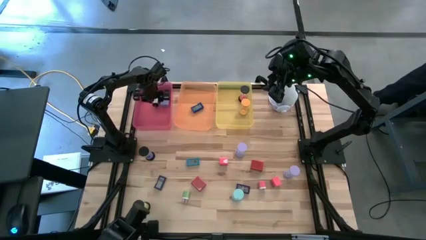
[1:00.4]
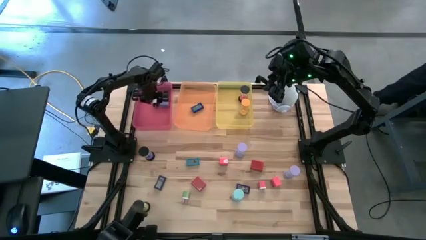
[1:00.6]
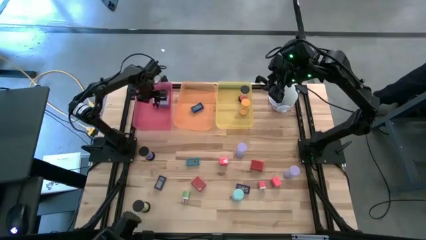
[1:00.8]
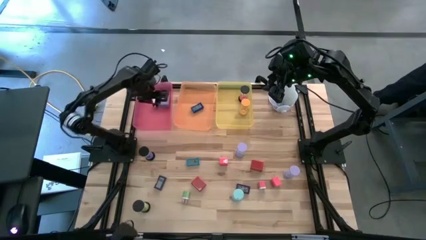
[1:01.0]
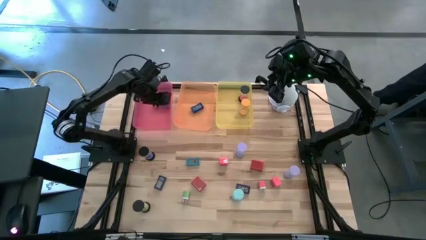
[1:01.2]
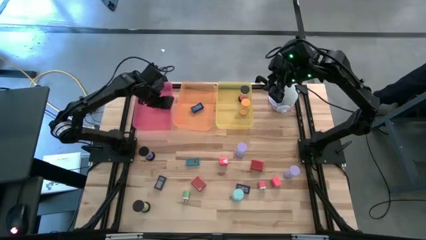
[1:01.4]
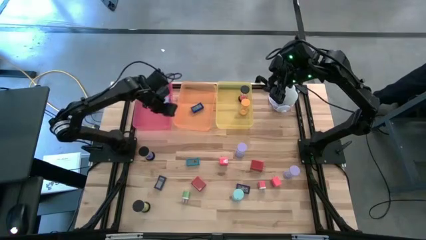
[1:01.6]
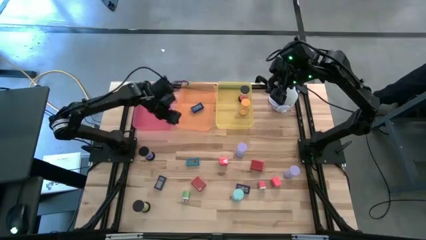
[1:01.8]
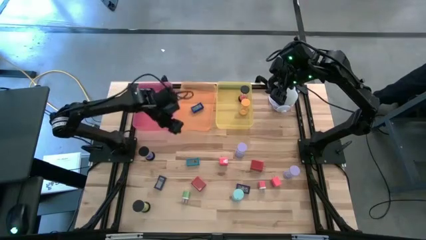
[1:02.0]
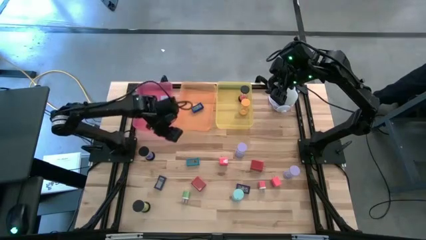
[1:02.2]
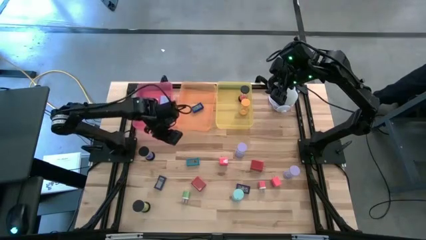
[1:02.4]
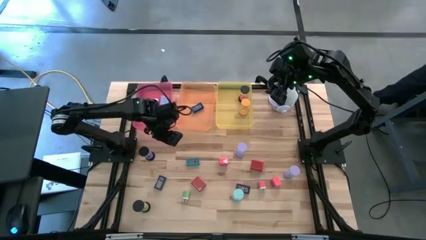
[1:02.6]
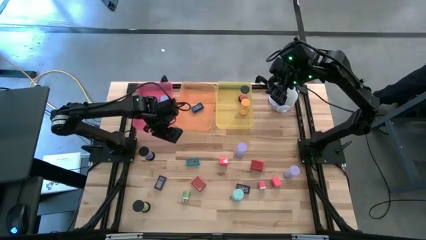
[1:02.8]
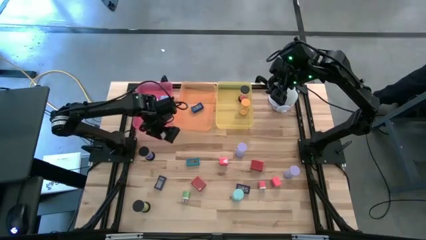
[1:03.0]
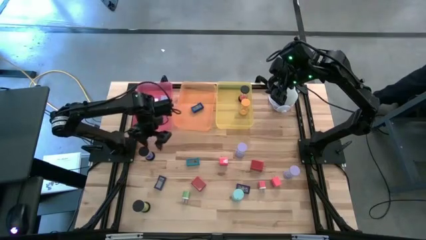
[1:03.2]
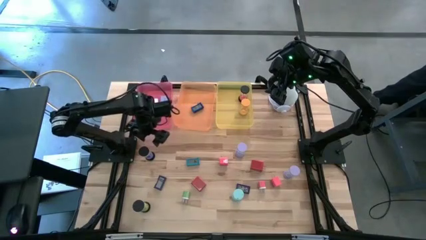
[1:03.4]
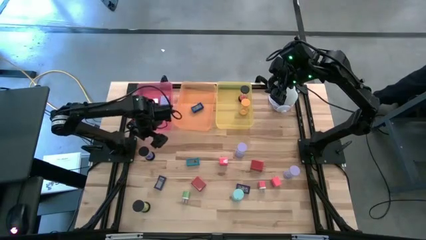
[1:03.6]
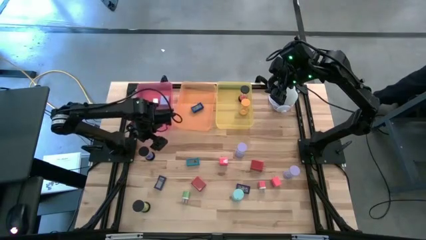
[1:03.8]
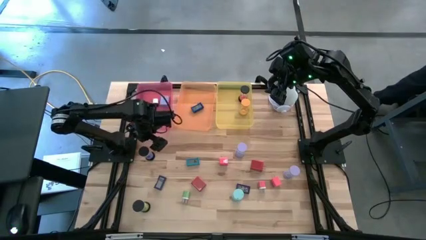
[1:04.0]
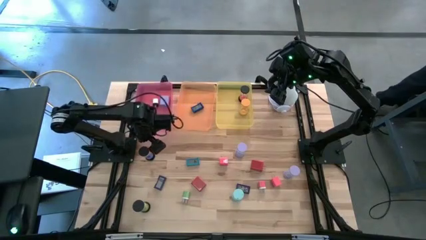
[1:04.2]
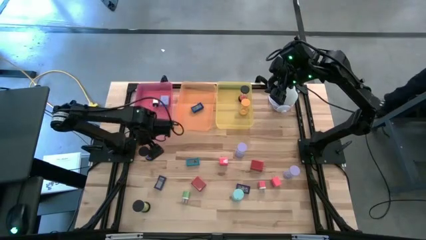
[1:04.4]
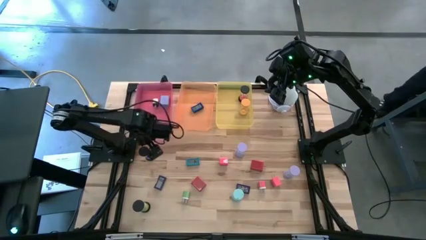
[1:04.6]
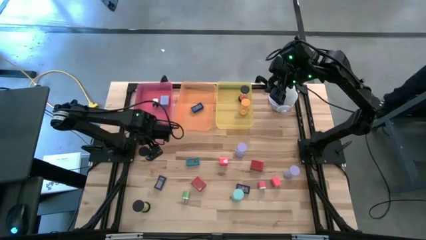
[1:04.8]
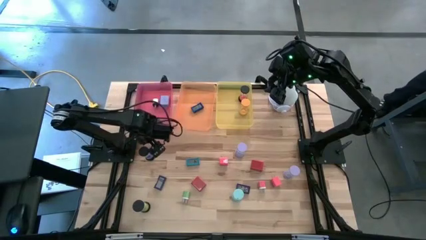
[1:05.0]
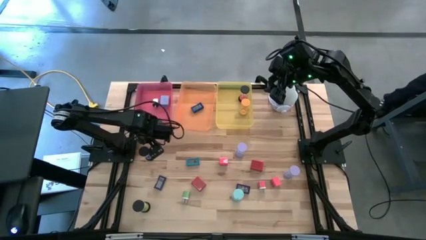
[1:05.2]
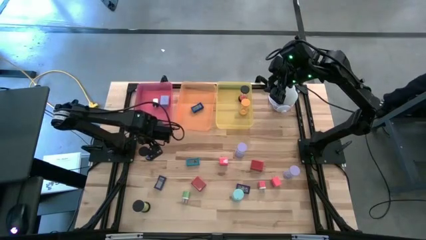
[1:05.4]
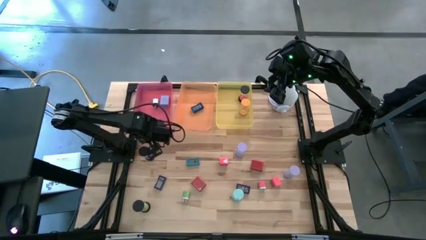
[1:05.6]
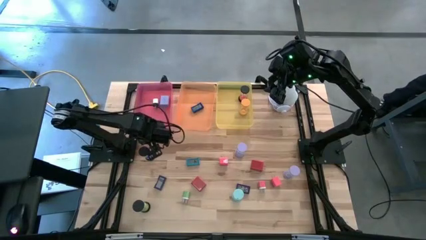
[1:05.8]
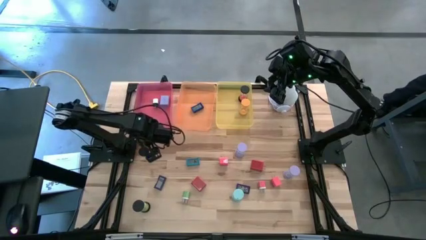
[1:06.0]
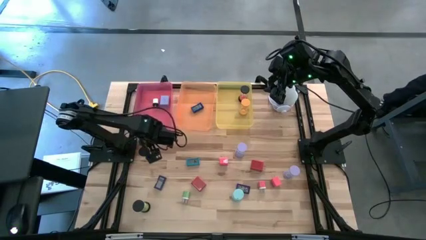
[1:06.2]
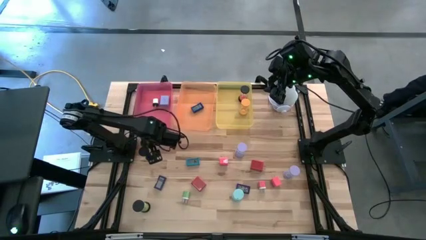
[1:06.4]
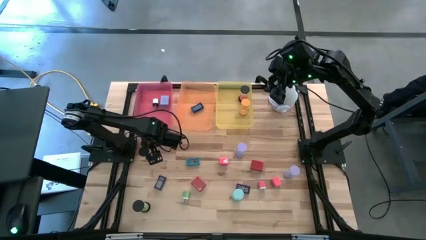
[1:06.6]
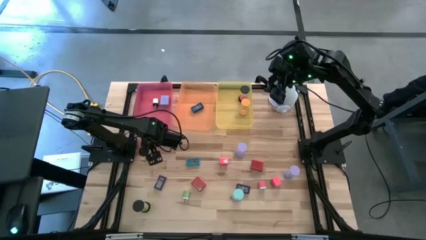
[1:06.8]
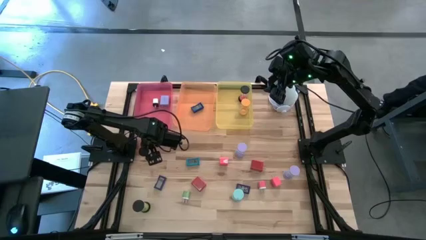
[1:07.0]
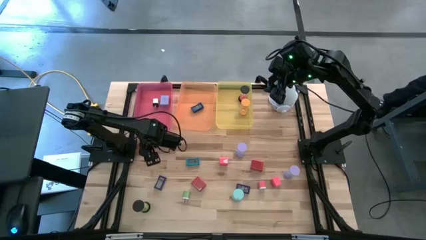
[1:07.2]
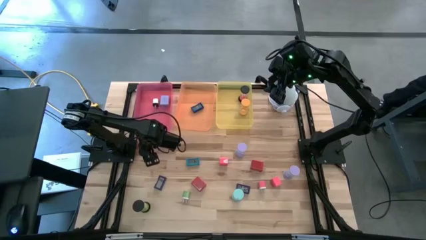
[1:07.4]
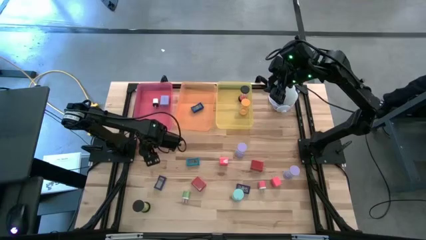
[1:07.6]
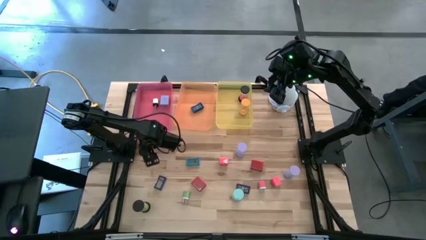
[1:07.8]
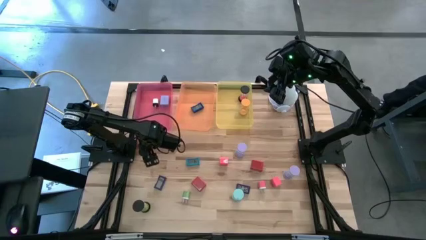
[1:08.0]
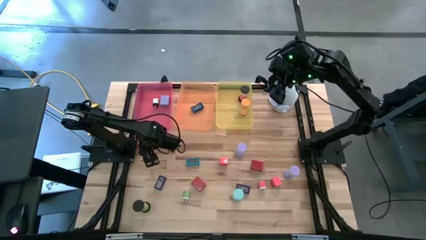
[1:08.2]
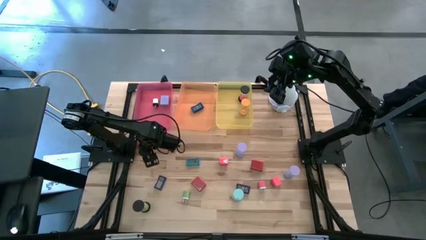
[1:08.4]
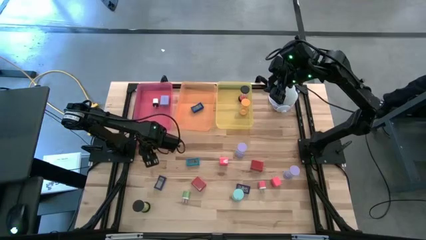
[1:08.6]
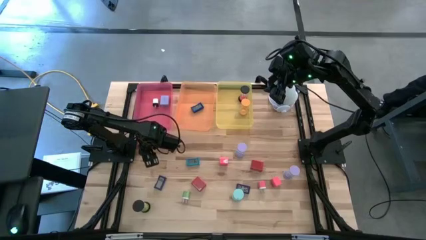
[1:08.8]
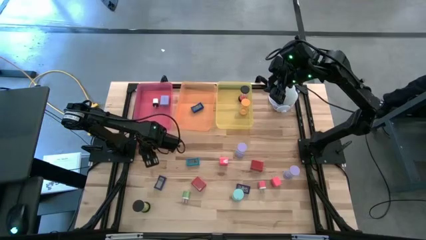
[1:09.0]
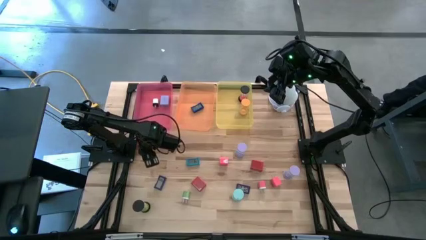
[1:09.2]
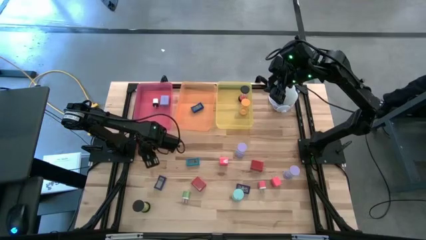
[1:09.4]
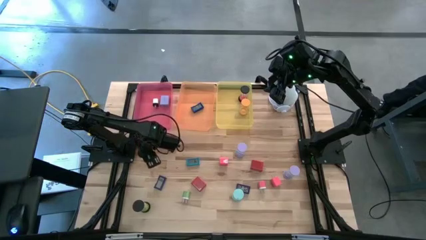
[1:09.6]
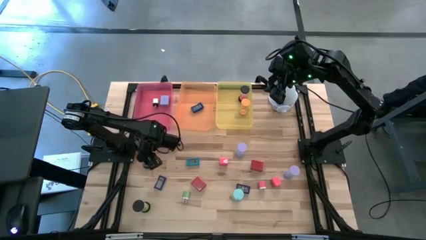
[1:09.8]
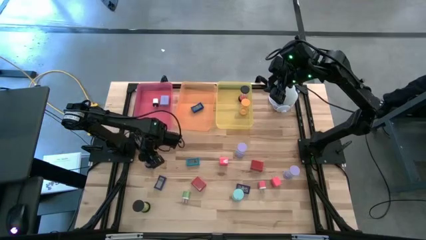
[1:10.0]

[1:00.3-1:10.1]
Task: Pick & Place Office items
Put the blue hourglass into the yellow bin

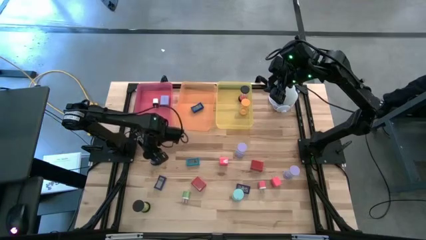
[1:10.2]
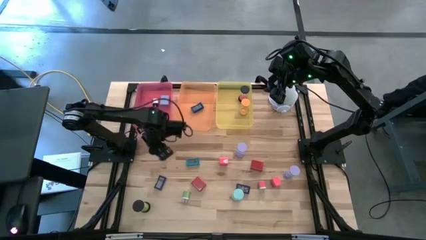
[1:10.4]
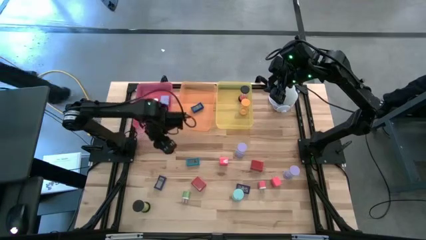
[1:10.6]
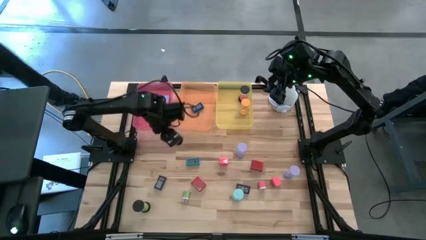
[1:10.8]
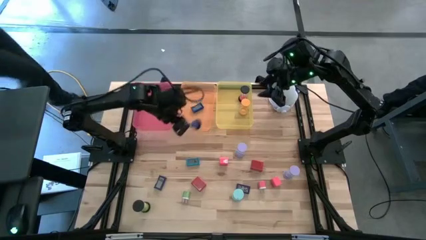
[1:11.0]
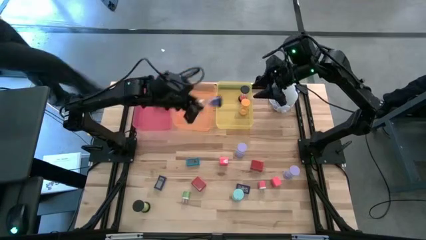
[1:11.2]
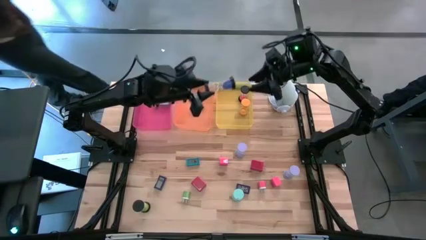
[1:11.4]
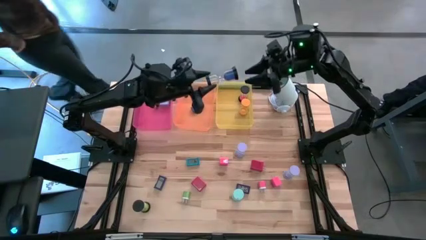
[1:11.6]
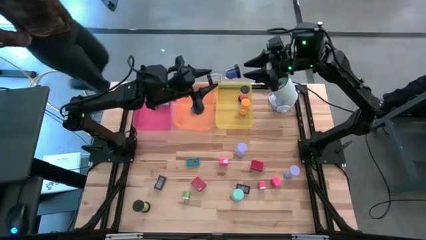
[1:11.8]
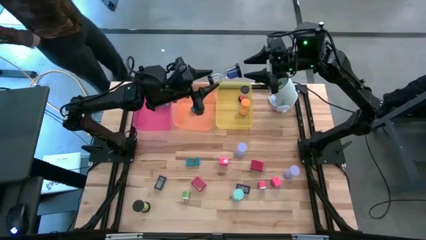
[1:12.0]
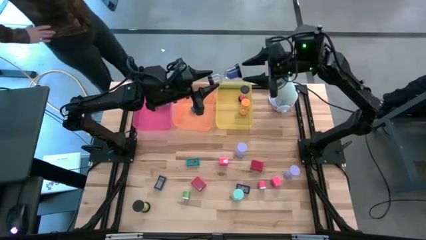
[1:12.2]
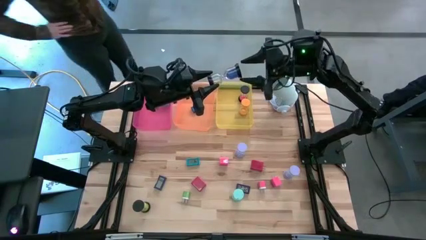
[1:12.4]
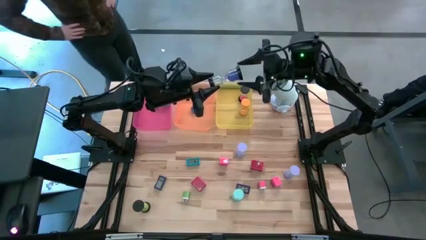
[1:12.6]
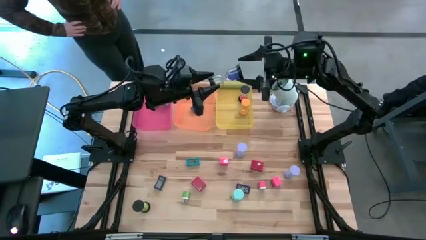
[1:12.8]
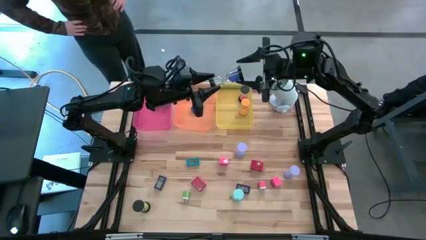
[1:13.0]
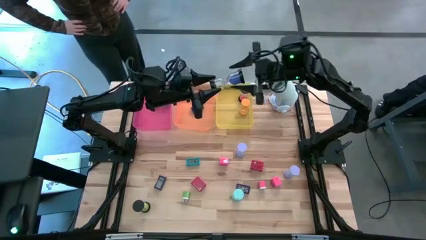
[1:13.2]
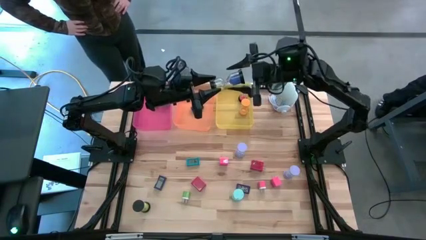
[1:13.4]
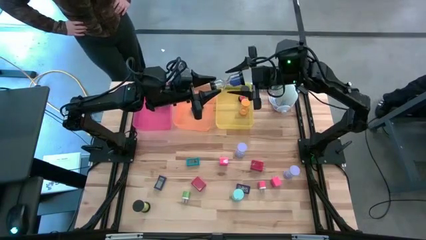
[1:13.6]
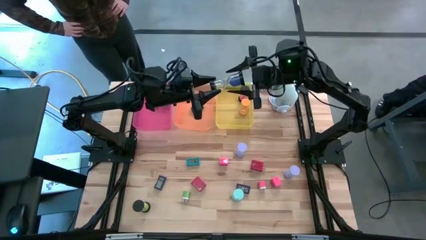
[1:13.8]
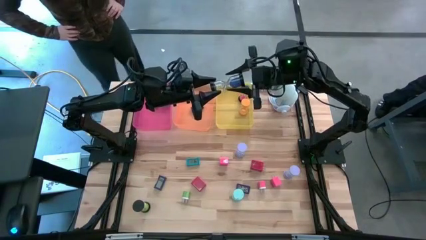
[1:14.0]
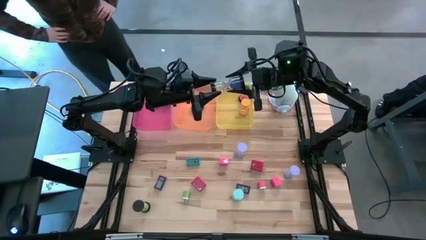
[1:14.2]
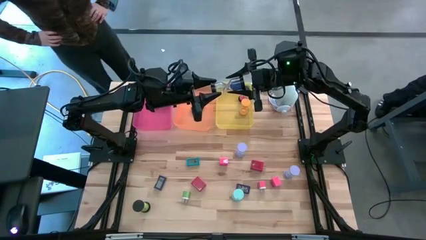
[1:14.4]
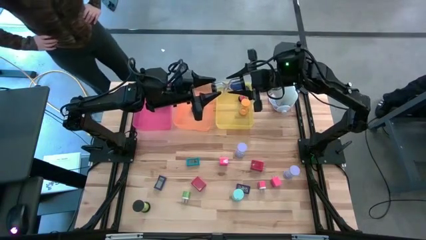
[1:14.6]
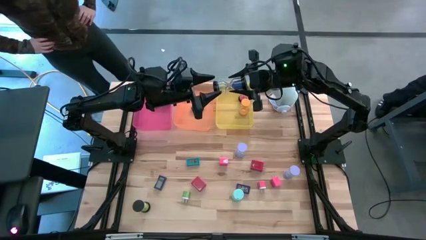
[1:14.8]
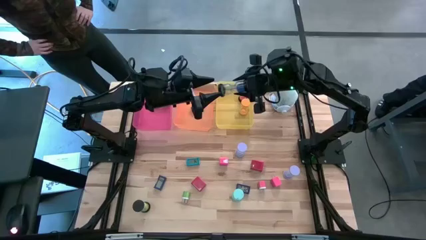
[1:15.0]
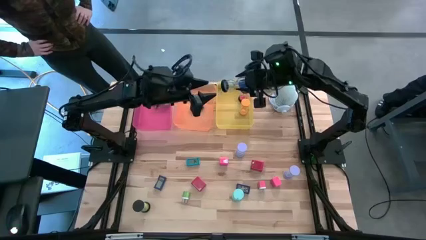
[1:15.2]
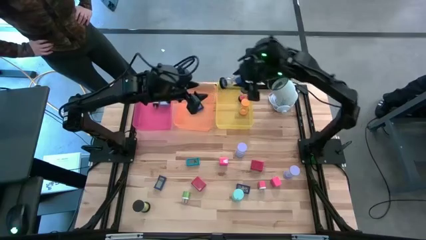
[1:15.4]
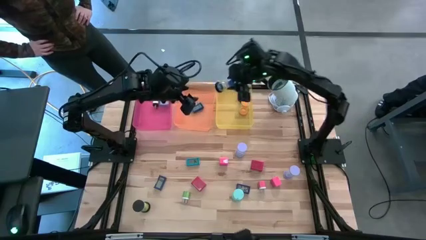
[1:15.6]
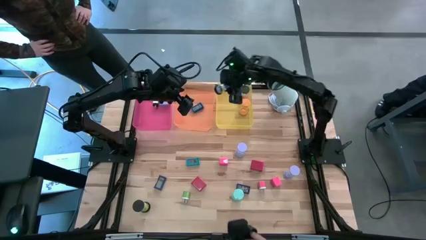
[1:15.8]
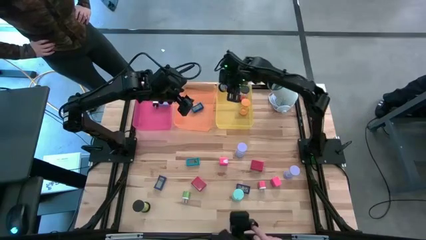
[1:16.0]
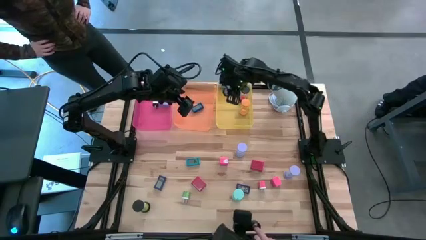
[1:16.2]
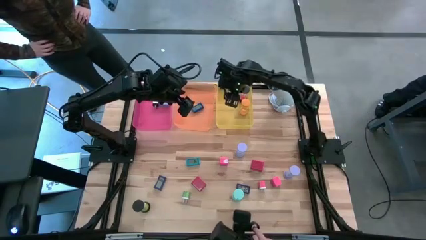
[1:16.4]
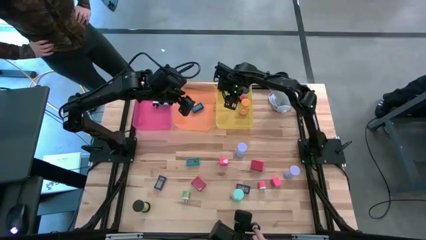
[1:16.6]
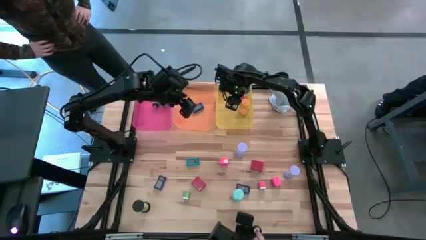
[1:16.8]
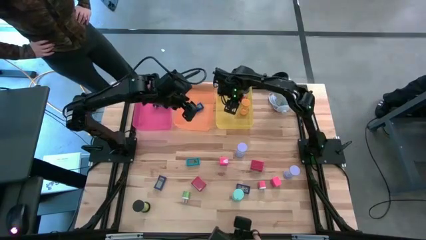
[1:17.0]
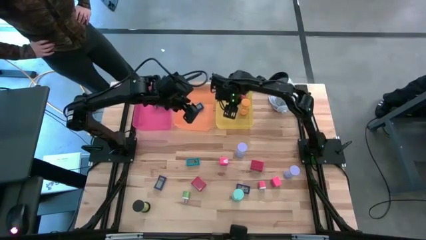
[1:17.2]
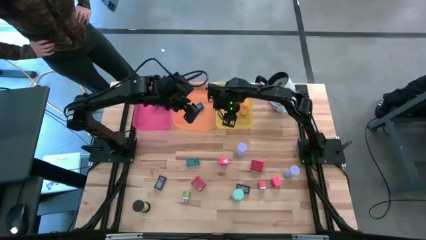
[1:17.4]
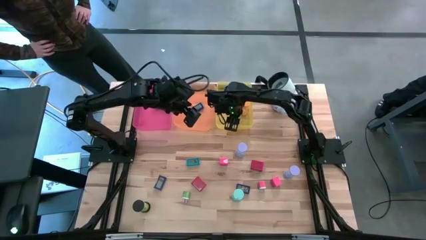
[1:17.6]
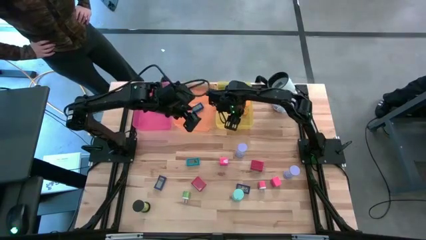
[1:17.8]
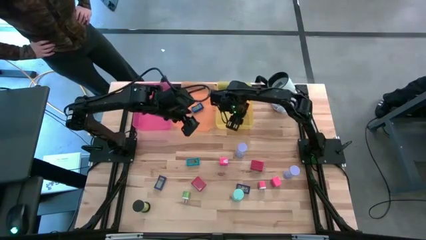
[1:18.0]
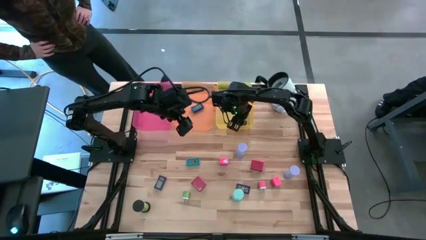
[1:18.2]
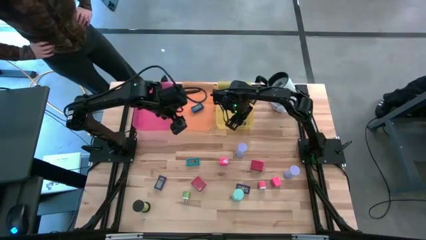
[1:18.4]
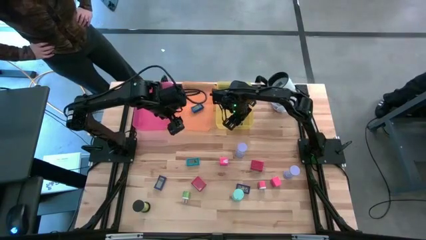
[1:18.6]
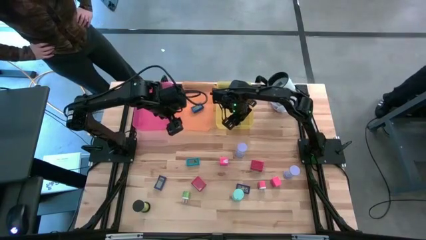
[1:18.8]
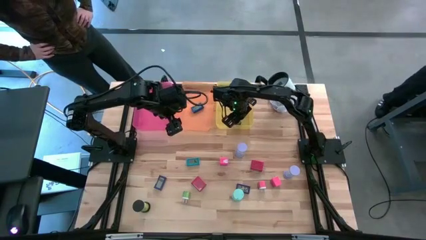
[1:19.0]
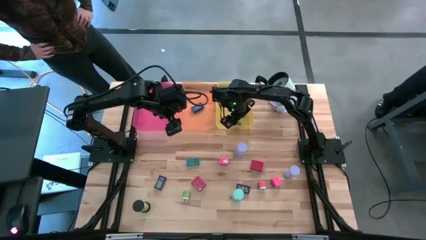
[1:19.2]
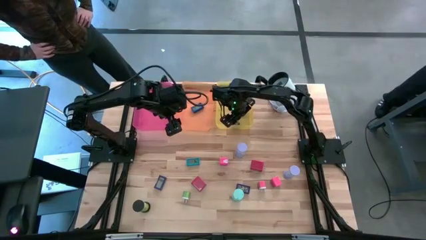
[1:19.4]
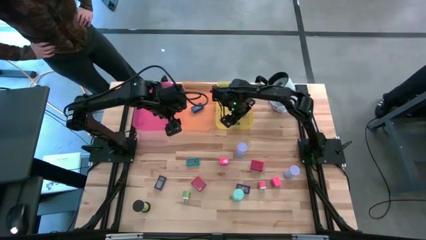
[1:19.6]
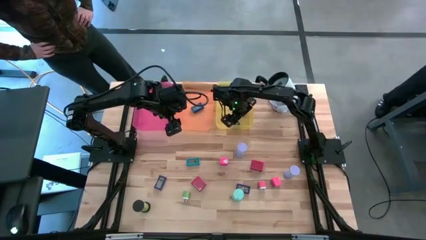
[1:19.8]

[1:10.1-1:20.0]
Put the blue hourglass into the yellow bin
